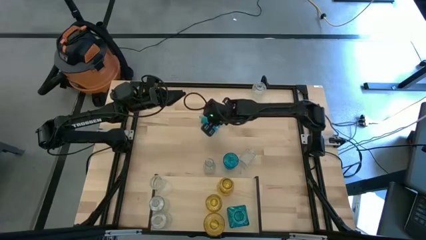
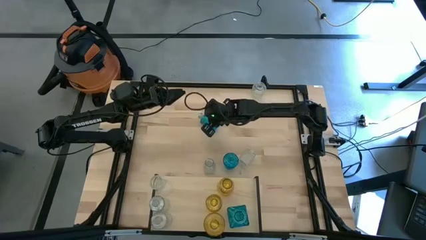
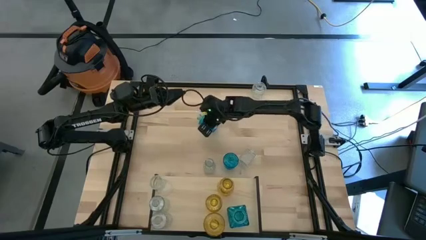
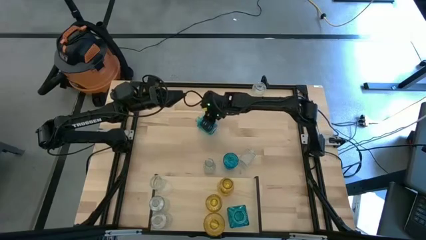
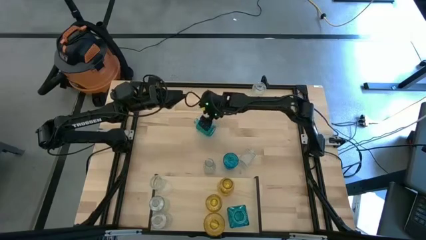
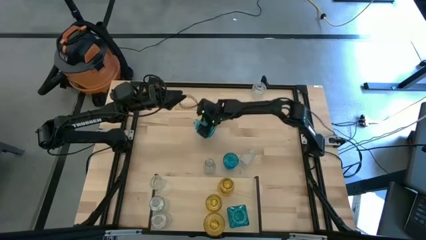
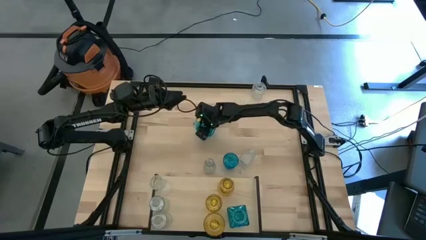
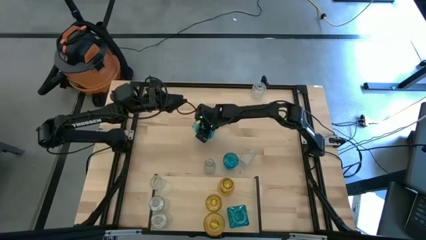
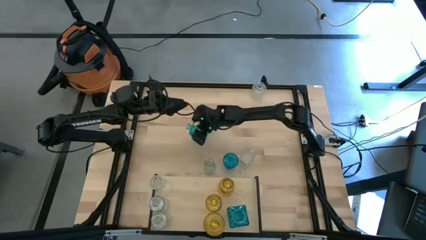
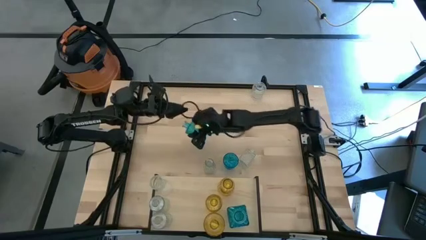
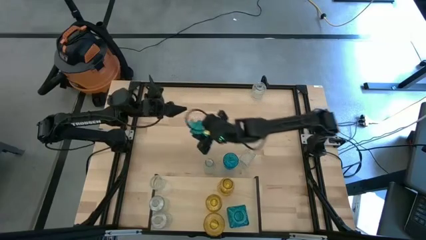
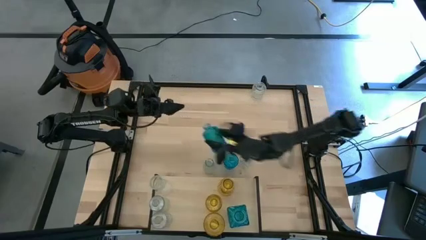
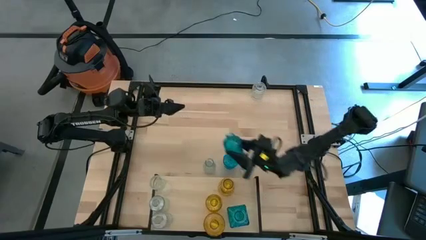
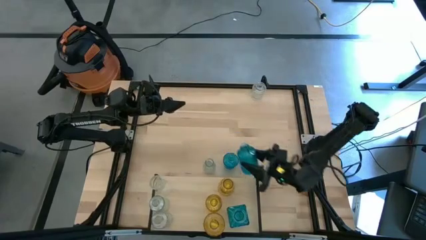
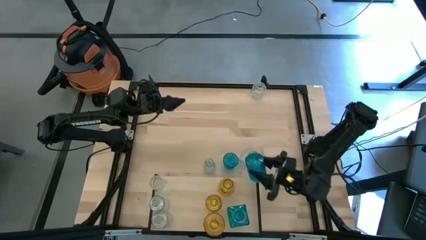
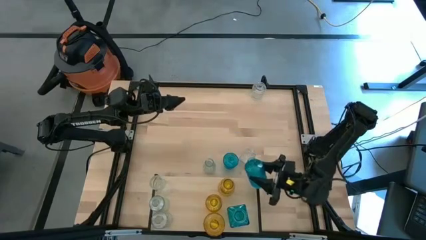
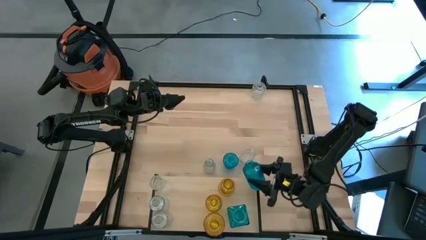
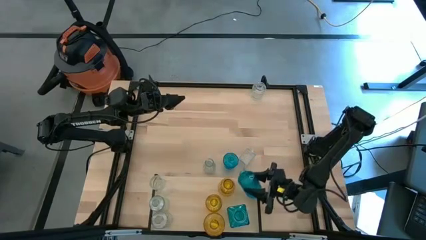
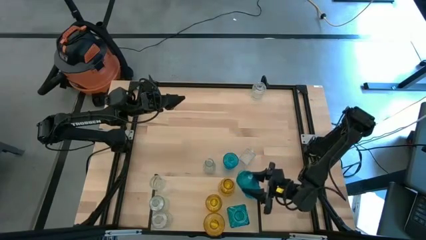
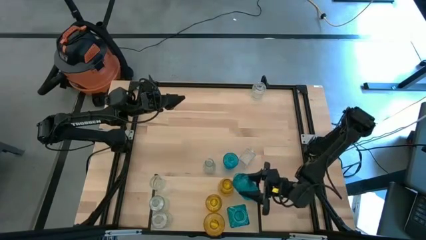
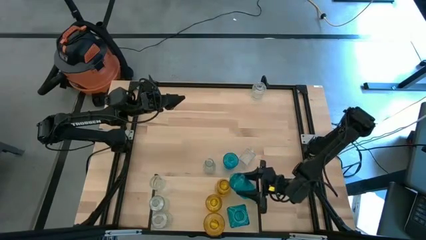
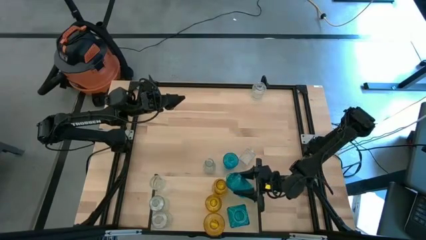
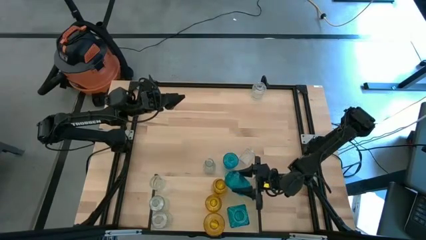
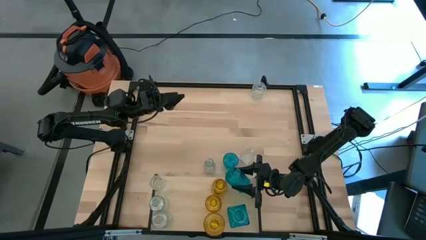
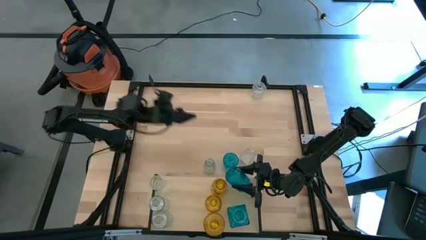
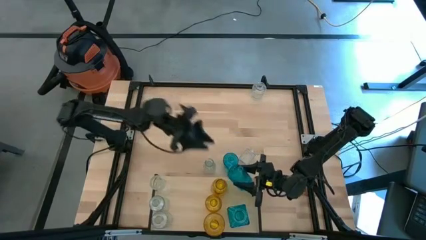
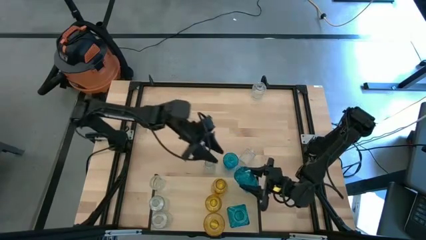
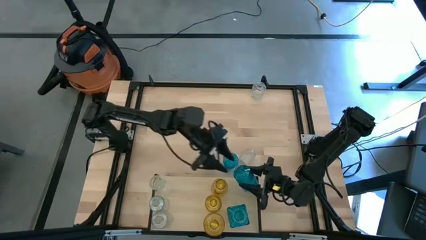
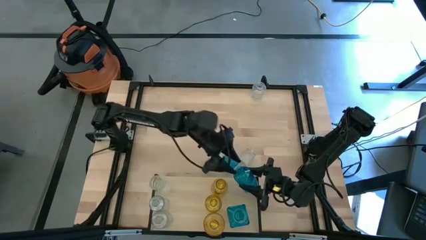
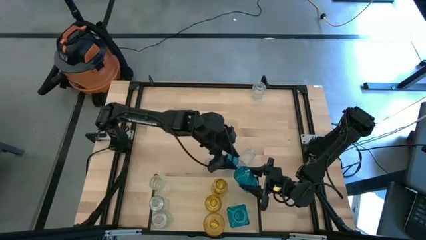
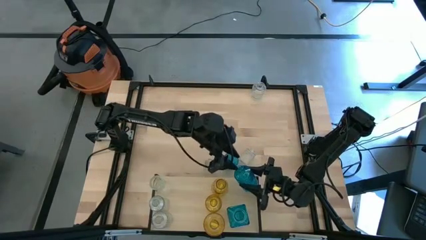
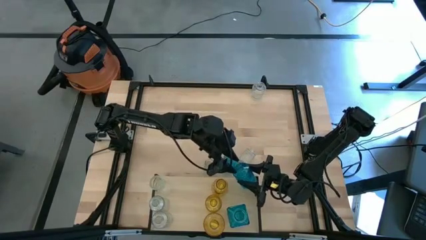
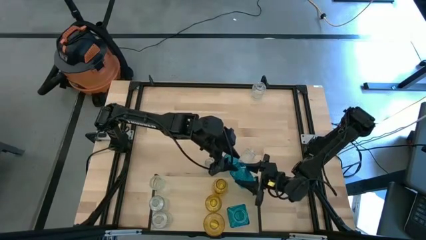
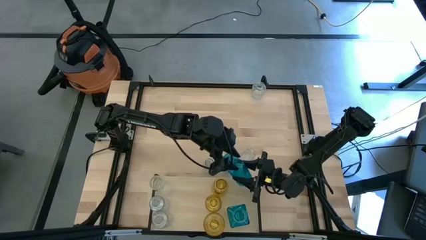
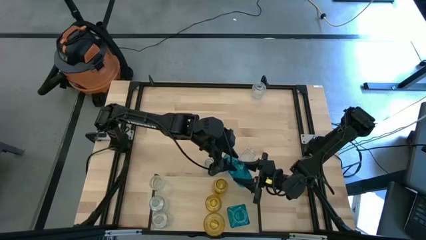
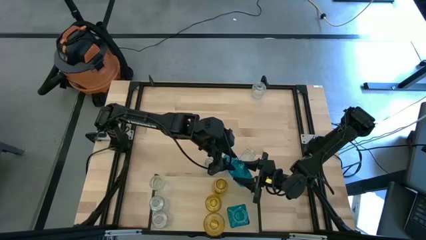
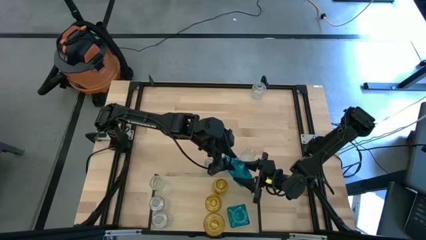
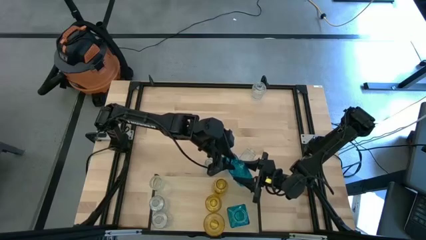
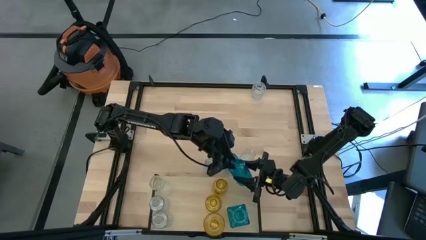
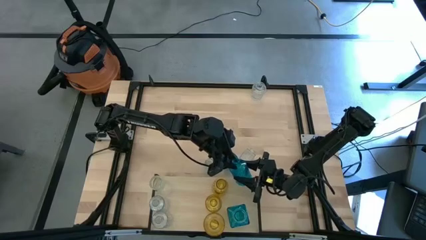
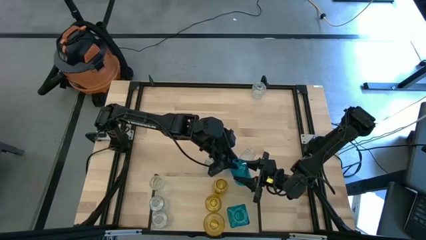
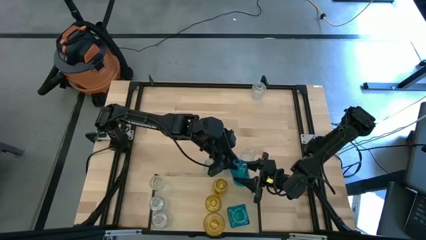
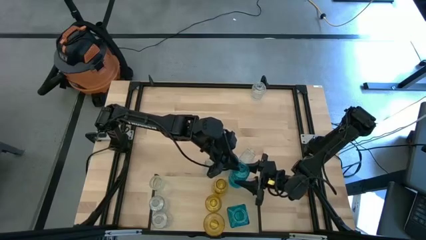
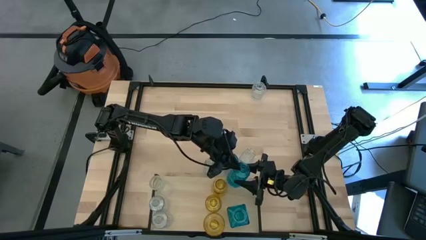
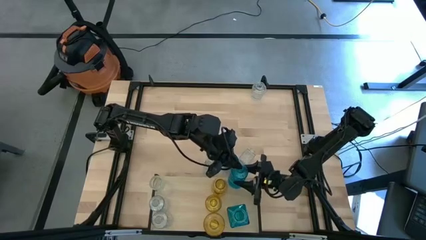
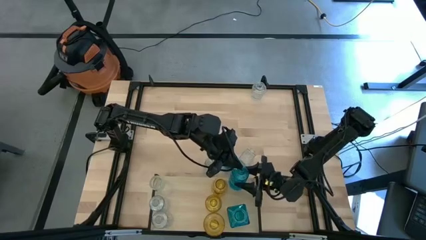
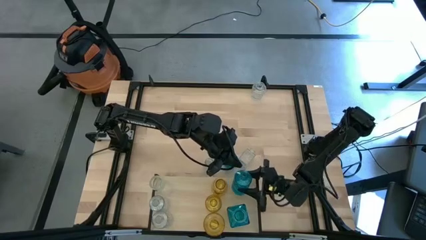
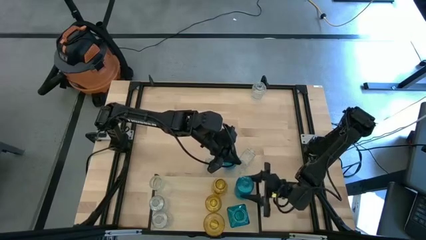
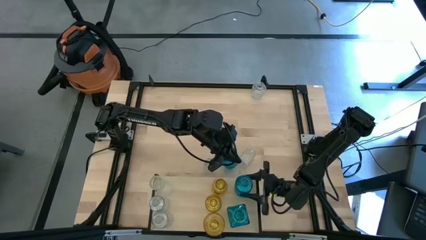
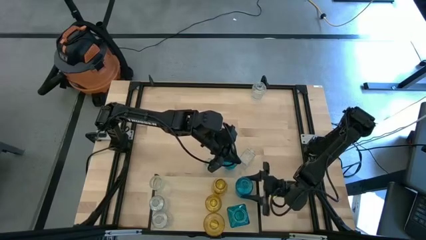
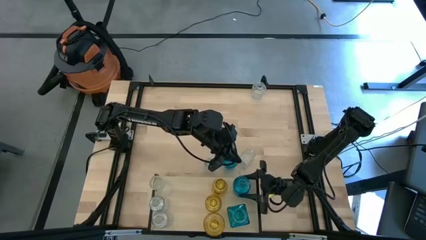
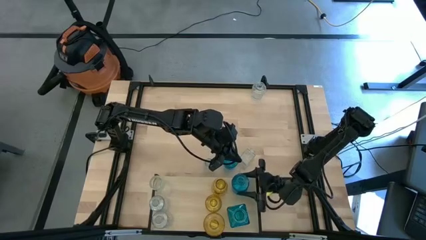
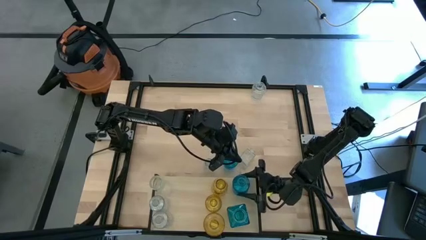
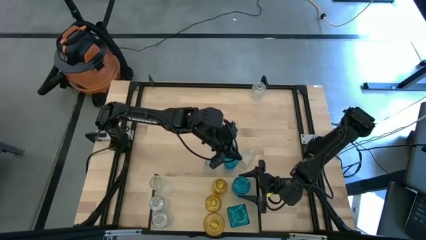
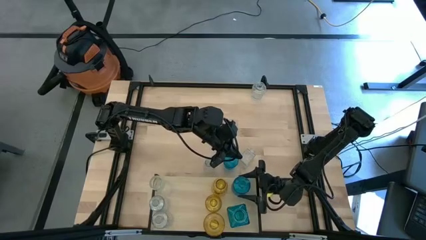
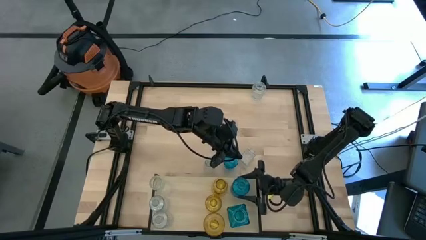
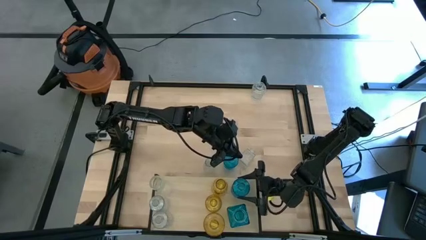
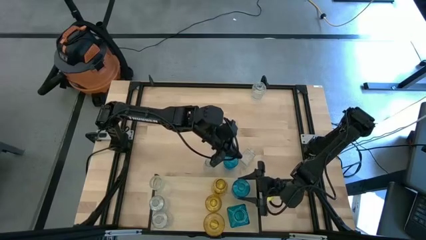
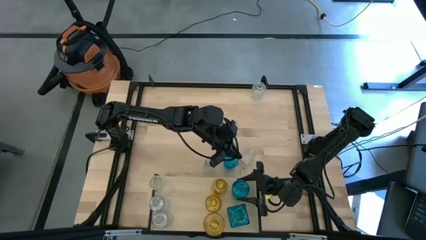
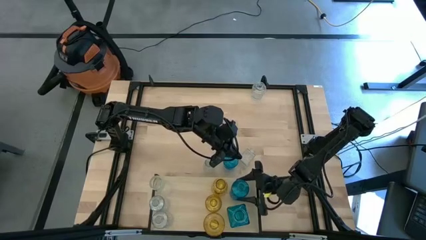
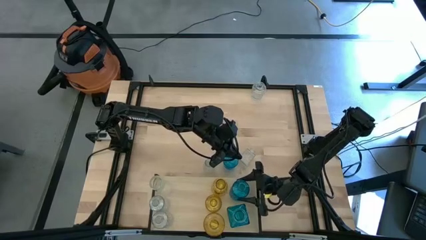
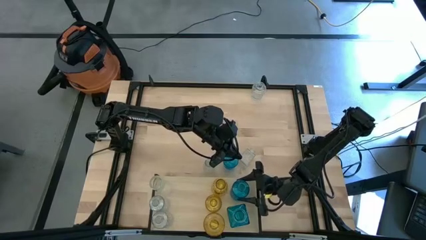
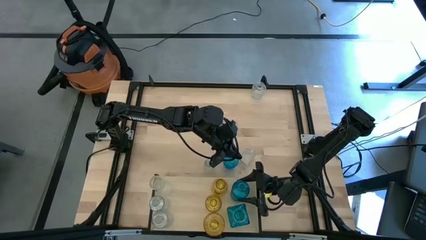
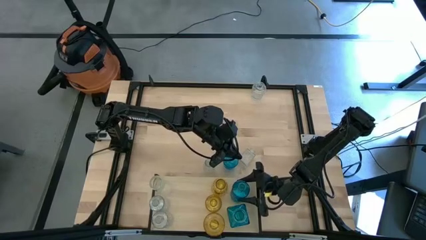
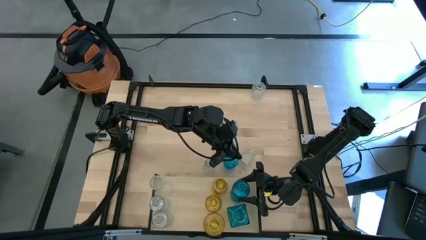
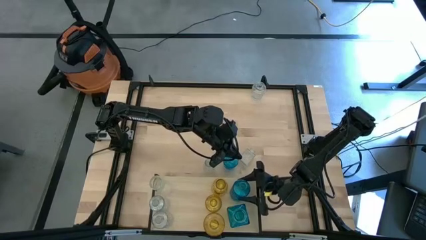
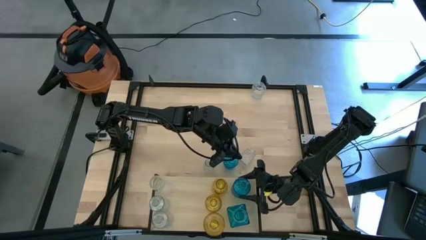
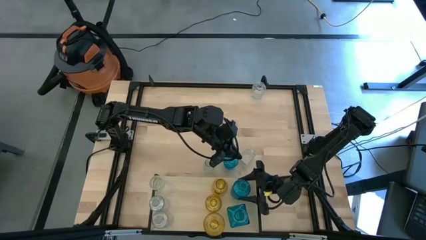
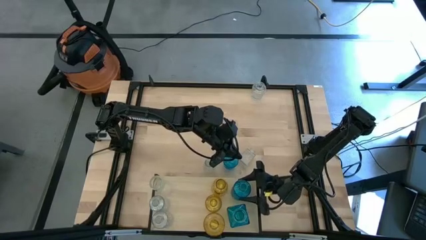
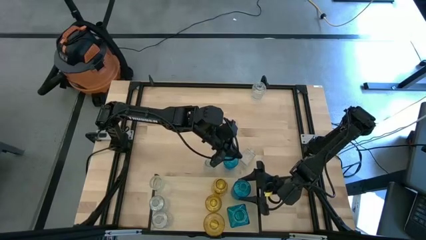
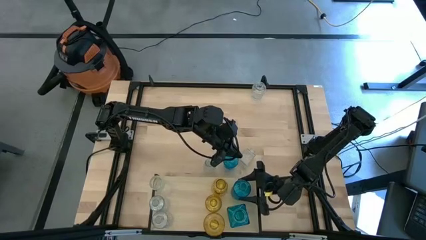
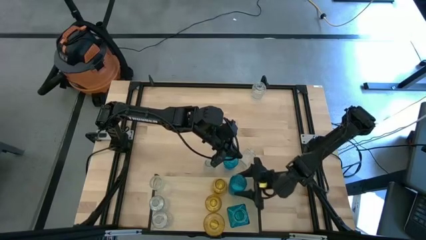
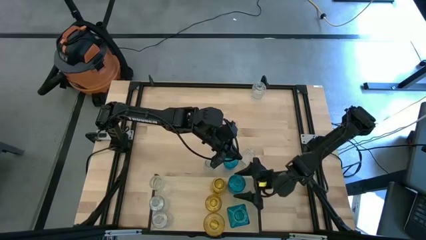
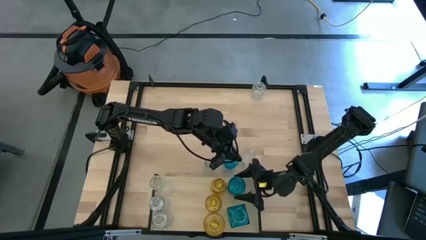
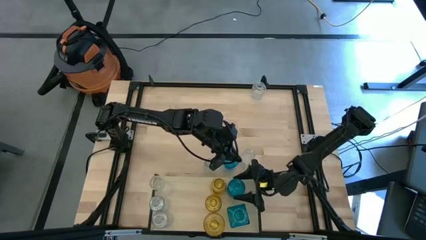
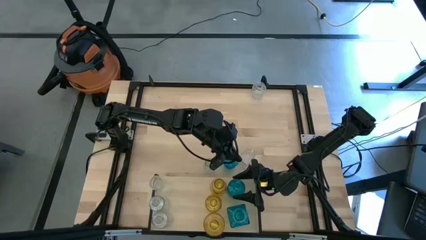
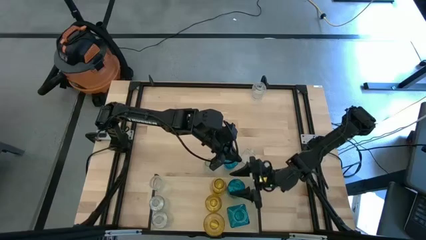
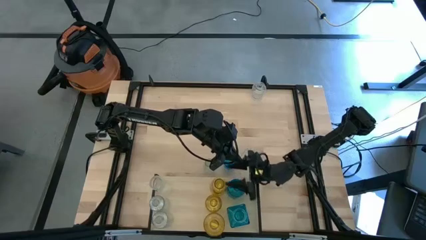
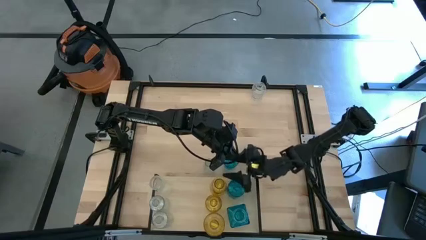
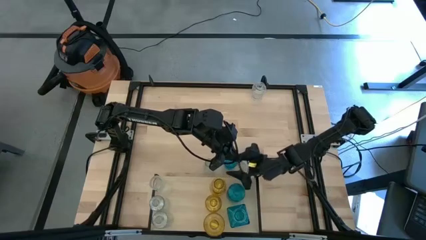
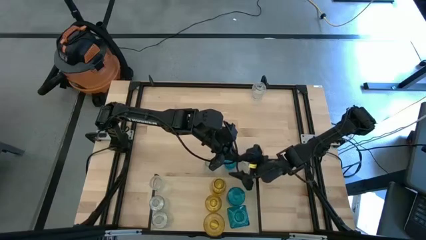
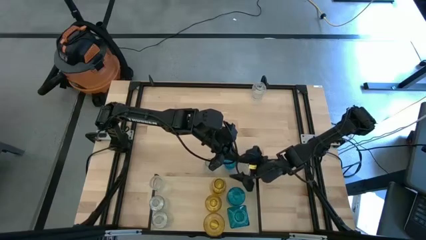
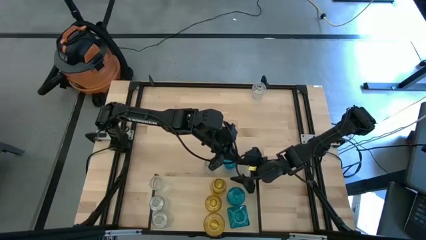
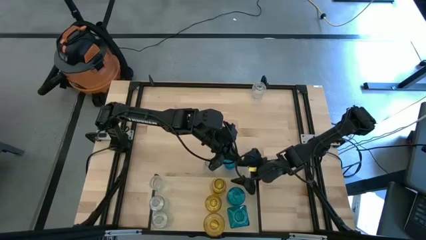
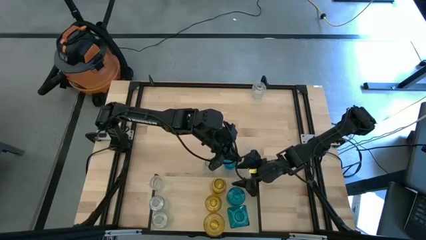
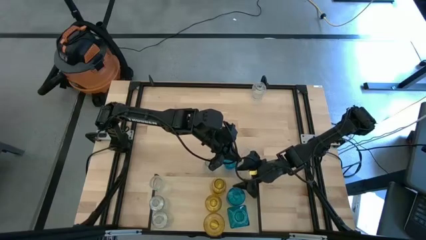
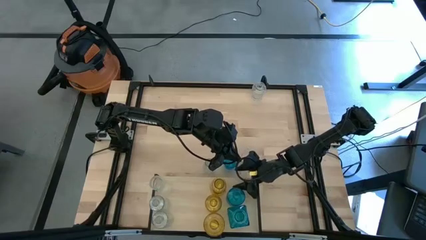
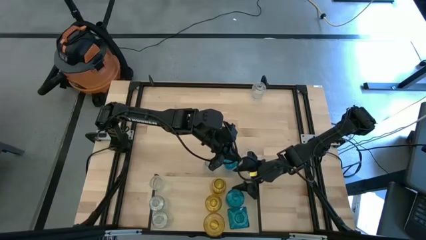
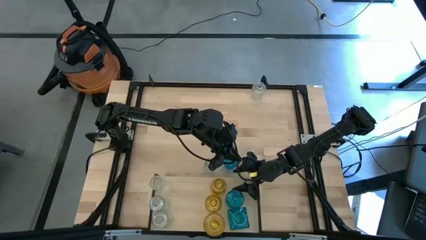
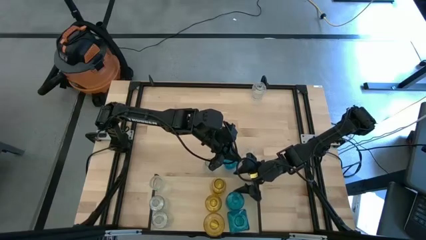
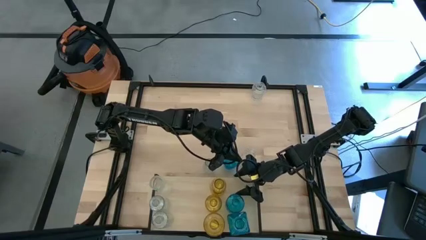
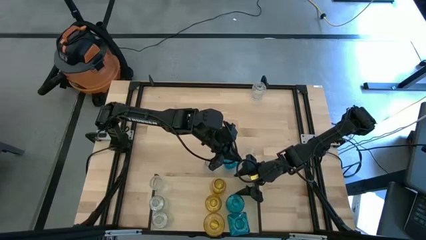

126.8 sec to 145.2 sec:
Task: sort vases onto shelf
Put the blue vase on the shelf aligned with the other blue vase
